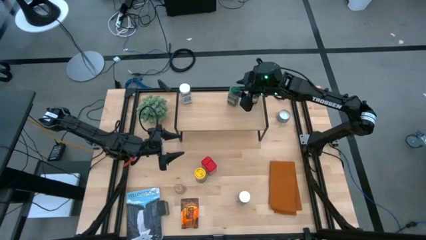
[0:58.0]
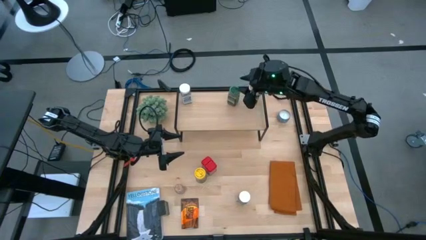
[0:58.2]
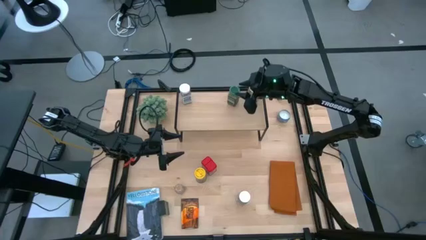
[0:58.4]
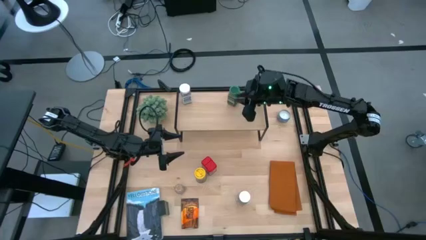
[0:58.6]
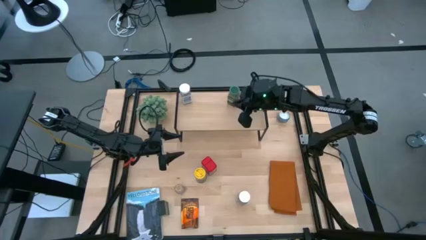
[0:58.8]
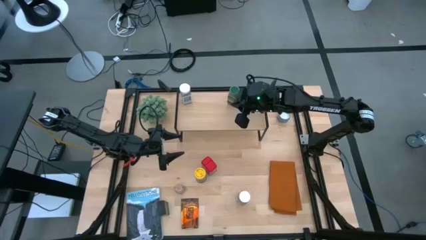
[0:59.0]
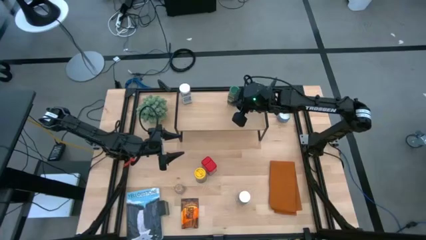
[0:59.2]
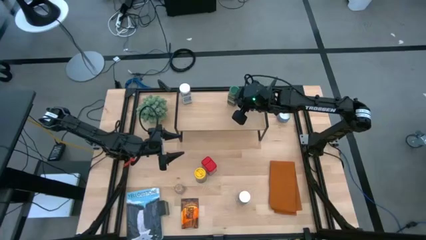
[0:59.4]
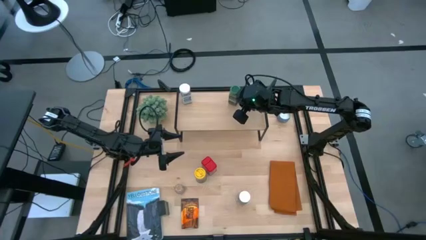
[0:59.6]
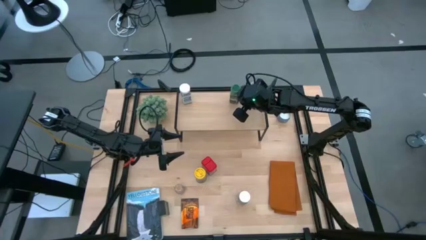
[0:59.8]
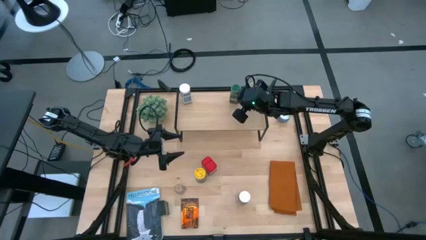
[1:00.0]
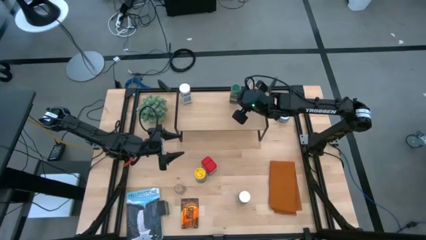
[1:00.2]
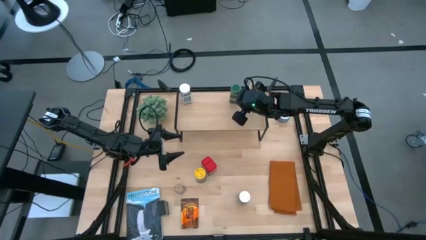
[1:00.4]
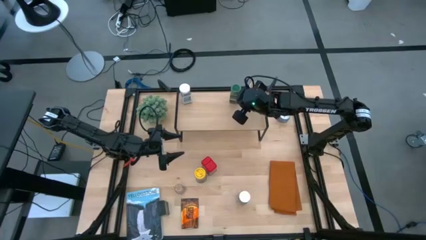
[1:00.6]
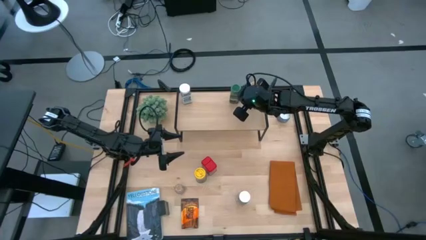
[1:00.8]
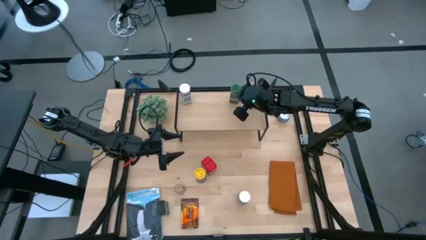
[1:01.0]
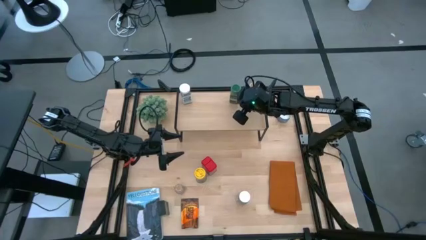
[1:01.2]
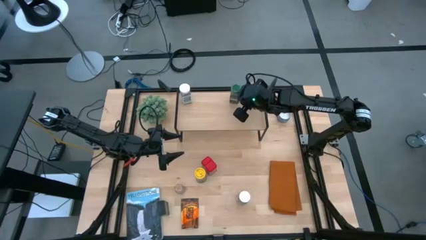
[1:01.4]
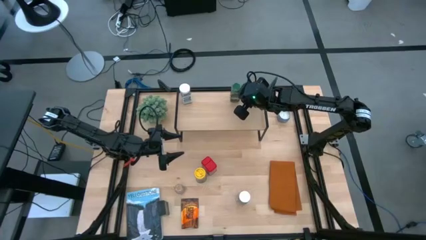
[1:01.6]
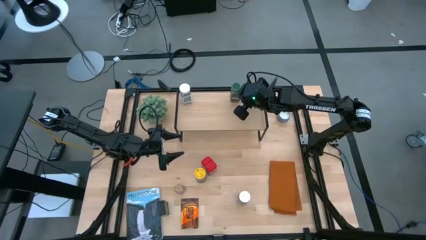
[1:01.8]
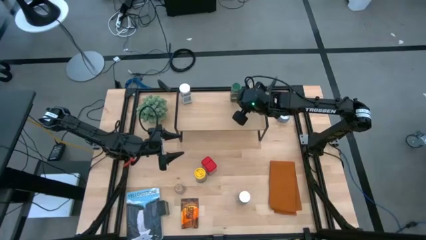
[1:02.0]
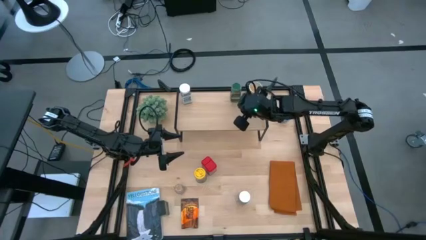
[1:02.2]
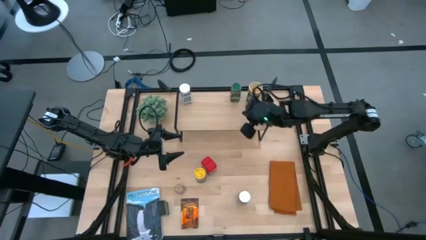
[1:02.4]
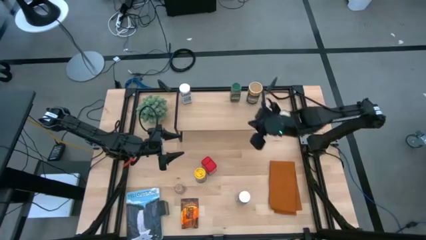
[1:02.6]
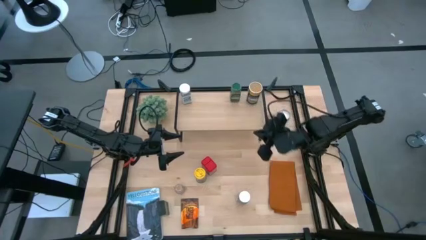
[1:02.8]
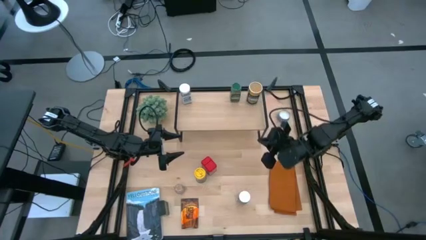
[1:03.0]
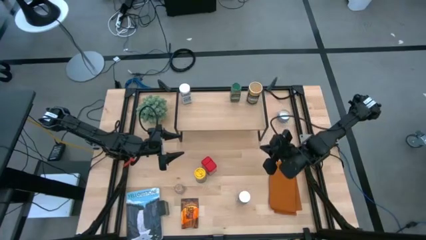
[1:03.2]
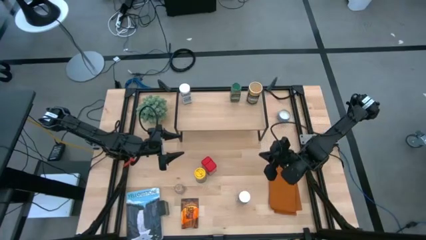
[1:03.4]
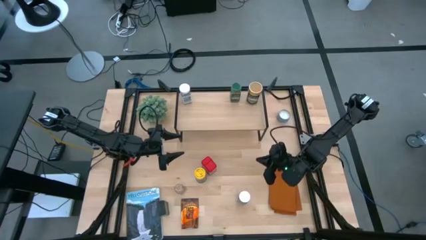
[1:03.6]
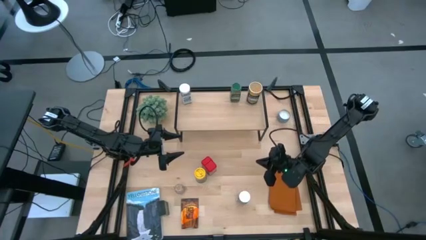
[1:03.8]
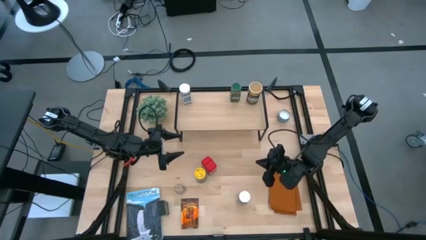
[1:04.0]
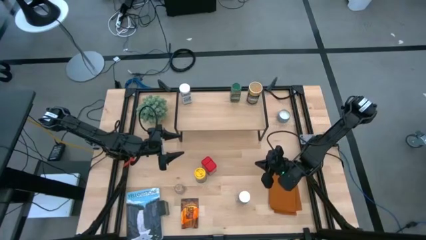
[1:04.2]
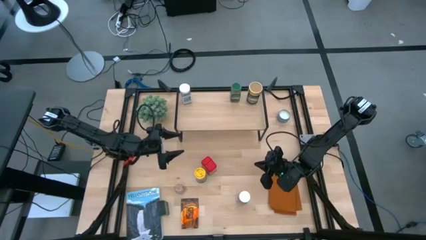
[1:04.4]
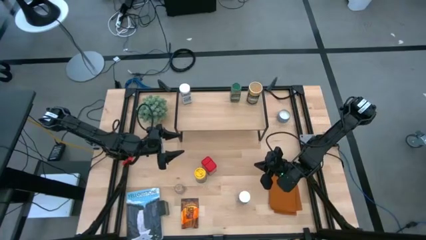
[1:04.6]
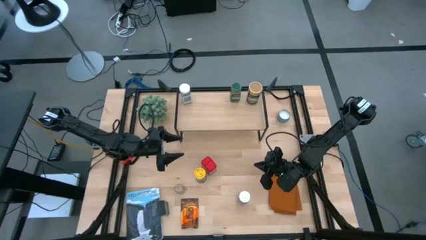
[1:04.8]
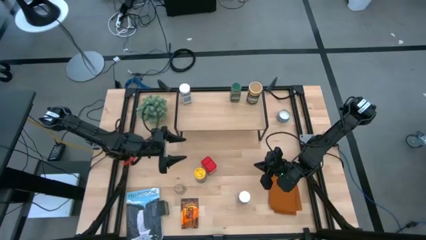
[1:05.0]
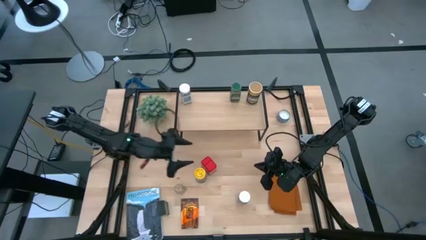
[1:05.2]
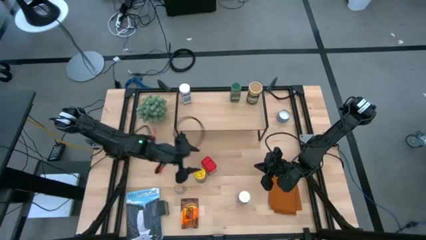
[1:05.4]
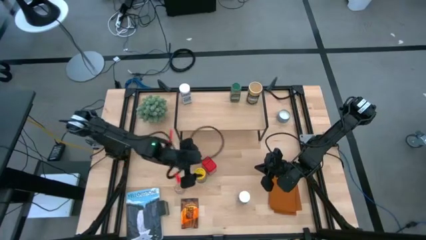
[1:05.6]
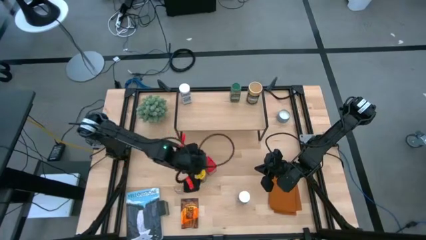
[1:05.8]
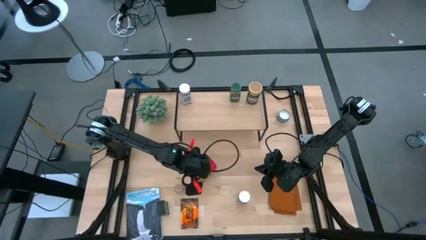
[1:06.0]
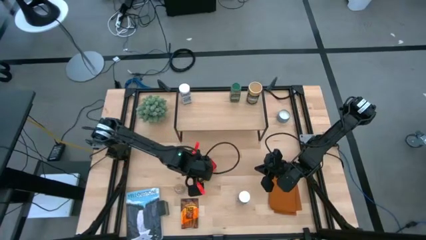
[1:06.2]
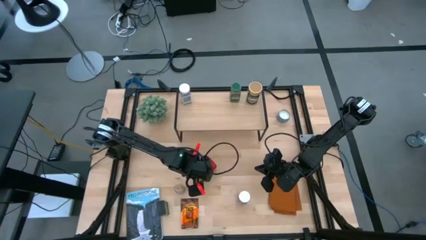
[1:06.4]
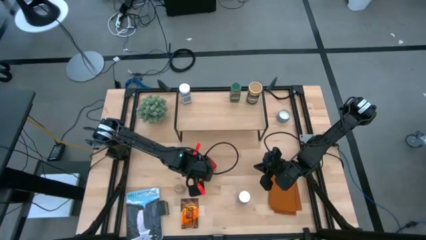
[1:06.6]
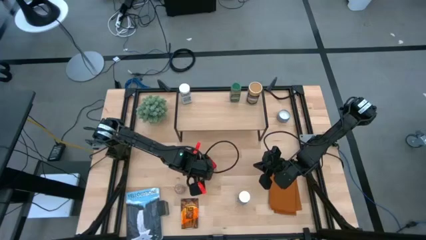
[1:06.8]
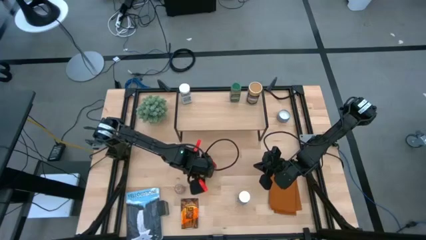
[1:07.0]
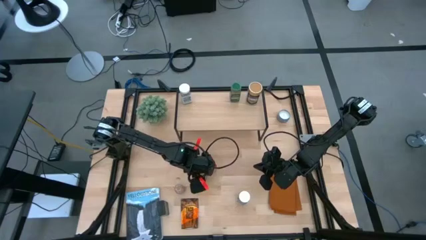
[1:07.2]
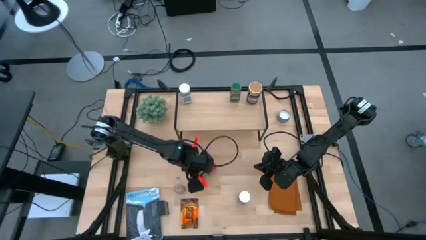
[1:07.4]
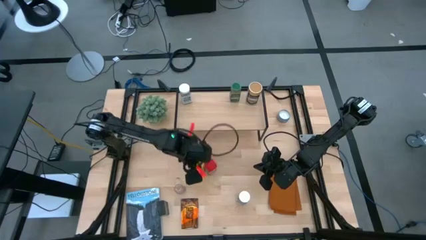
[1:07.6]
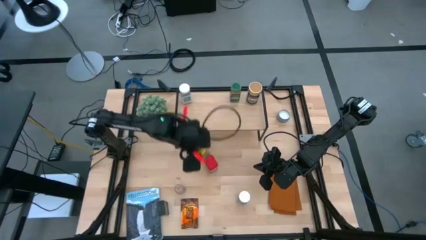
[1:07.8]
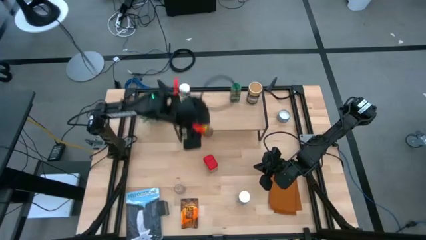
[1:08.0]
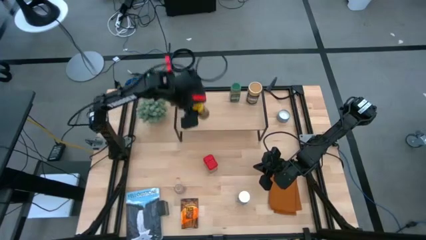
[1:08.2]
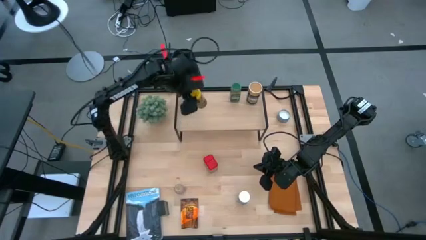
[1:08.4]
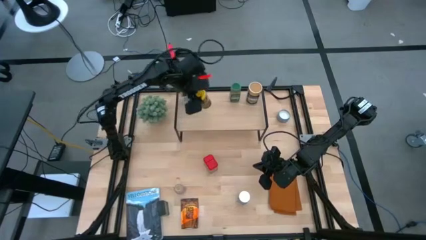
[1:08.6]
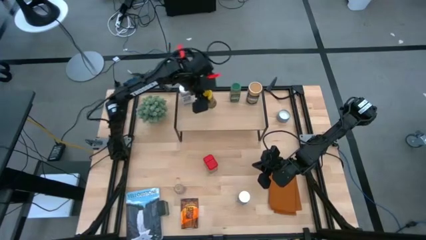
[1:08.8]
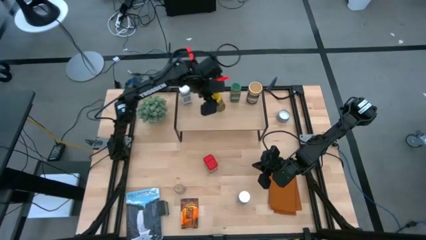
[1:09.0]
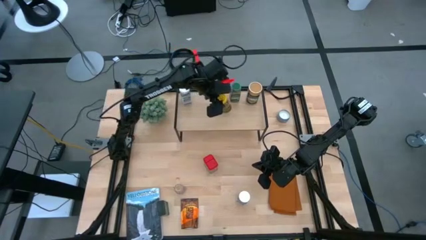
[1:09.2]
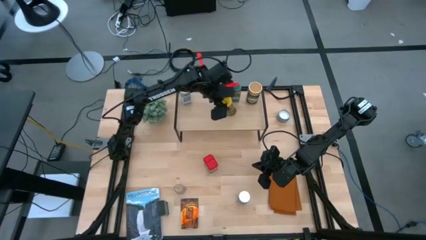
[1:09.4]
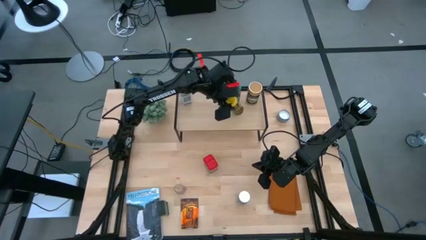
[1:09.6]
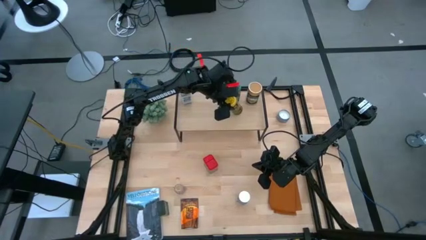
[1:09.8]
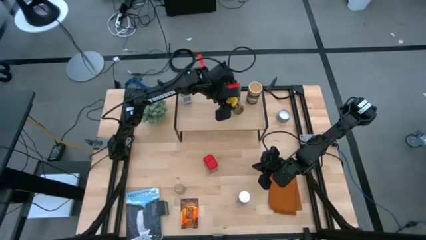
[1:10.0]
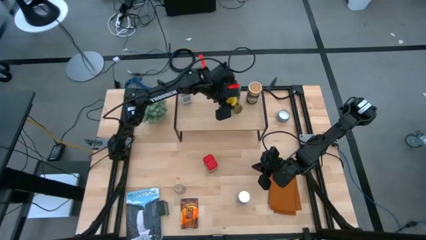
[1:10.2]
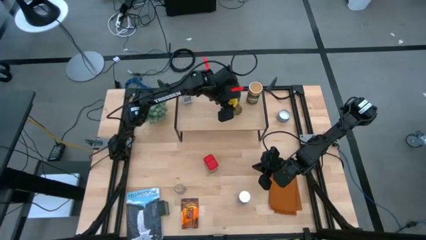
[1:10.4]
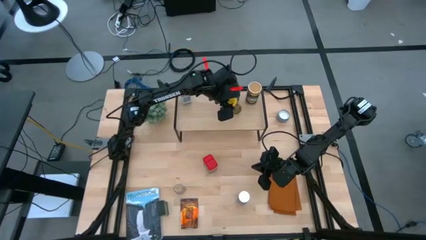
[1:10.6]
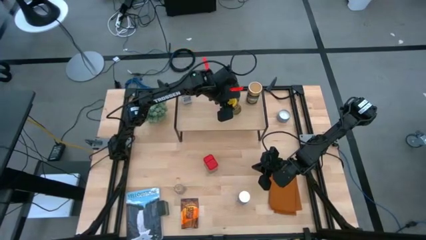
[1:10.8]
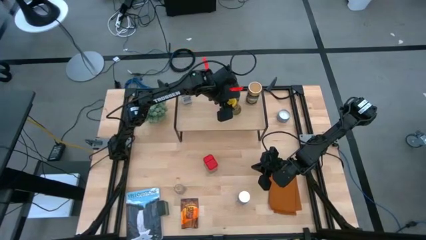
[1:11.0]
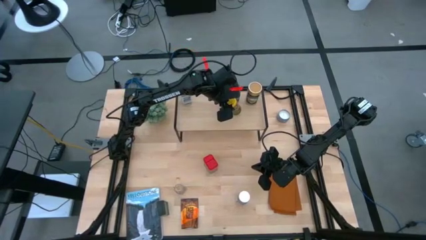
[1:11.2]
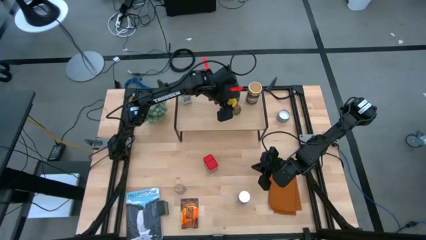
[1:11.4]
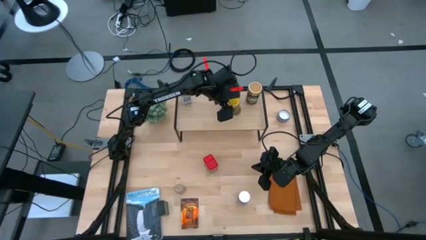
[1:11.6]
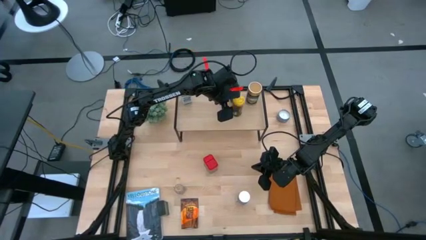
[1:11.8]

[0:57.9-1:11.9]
Task: Shelf spices
Put the yellow seasoning bottle onto the shelf
